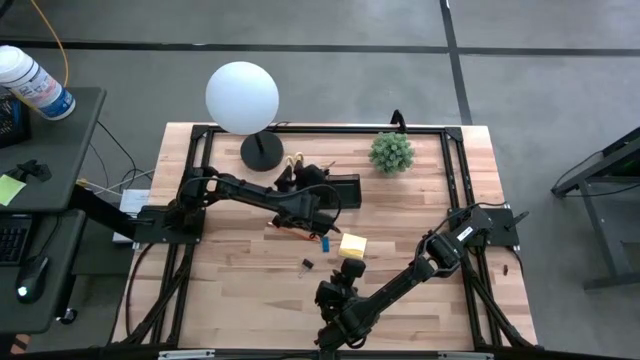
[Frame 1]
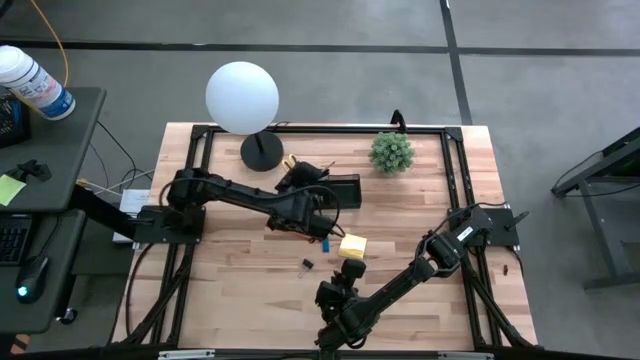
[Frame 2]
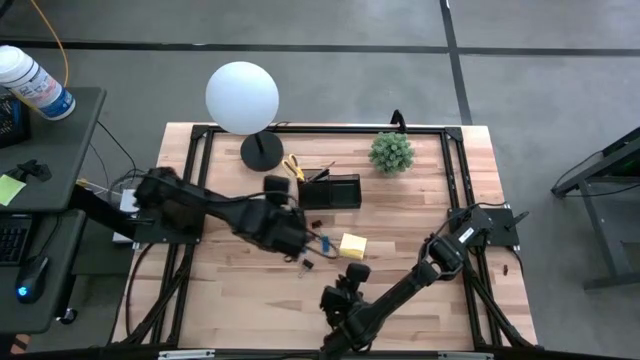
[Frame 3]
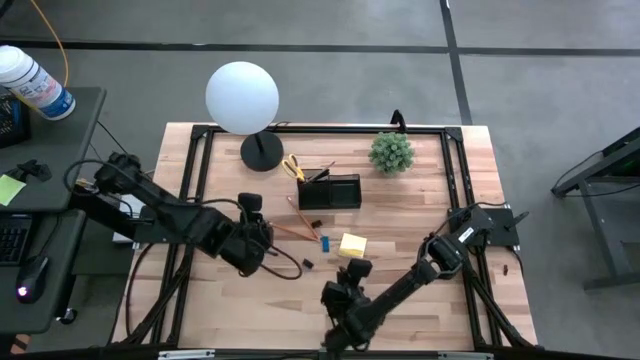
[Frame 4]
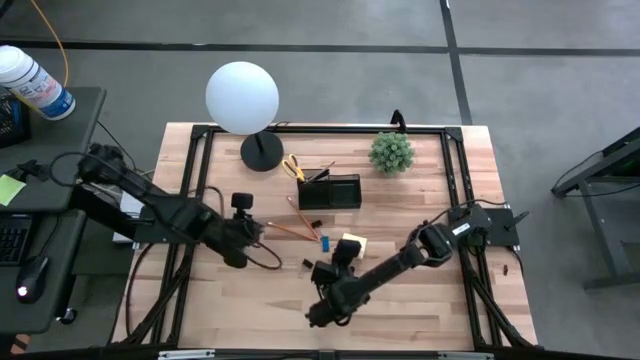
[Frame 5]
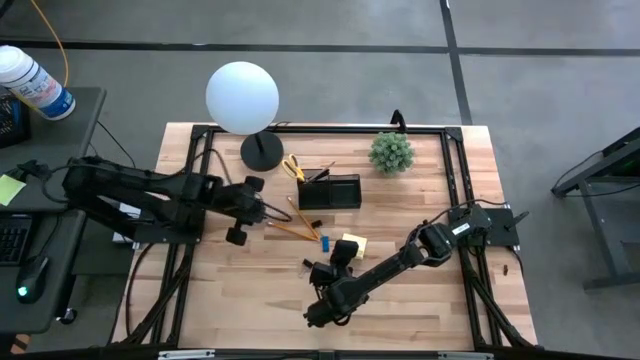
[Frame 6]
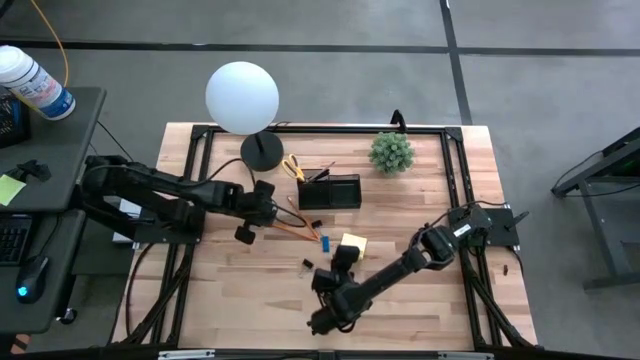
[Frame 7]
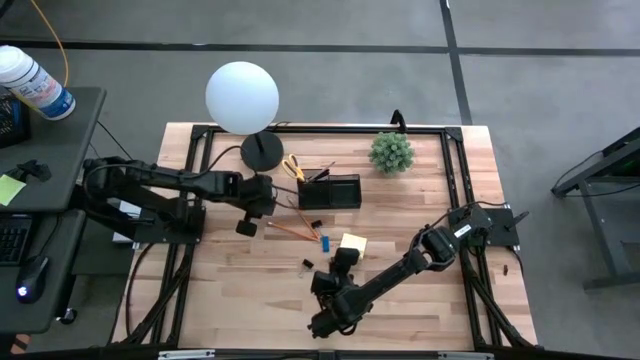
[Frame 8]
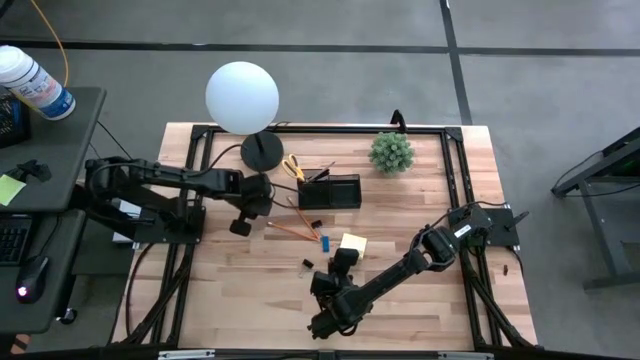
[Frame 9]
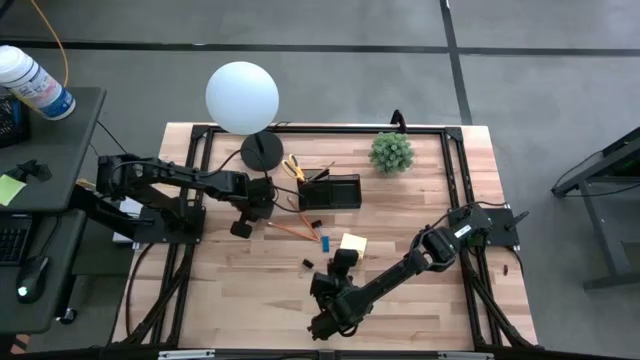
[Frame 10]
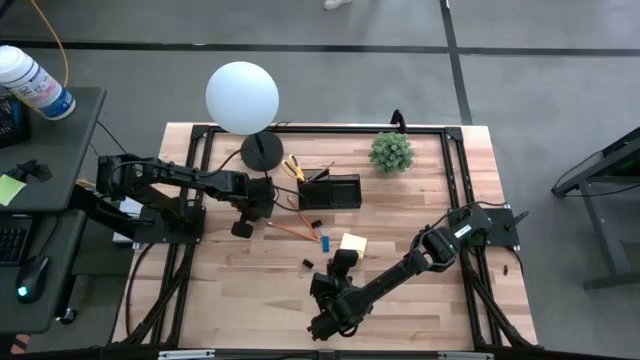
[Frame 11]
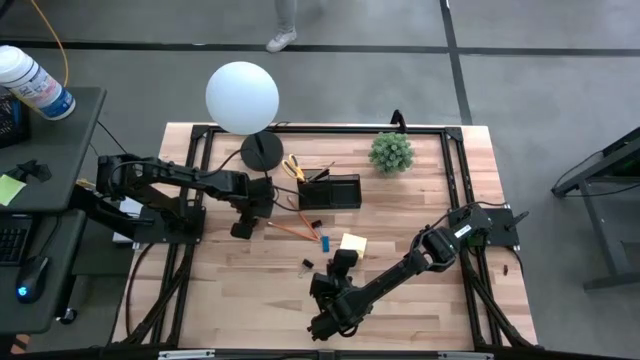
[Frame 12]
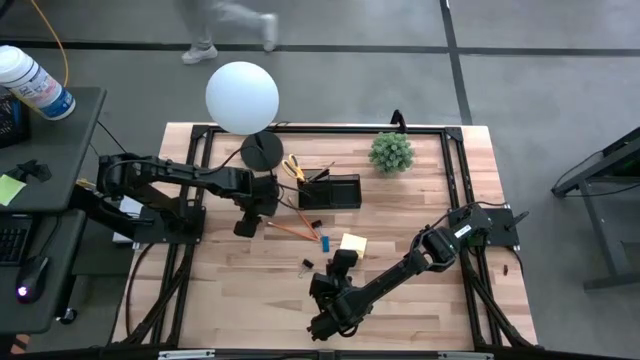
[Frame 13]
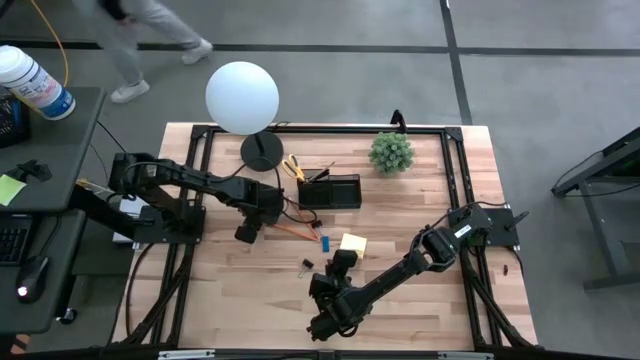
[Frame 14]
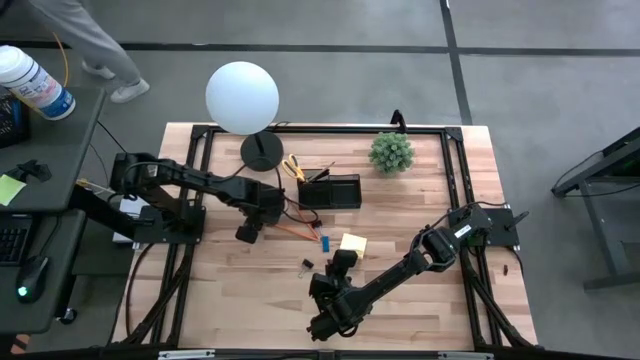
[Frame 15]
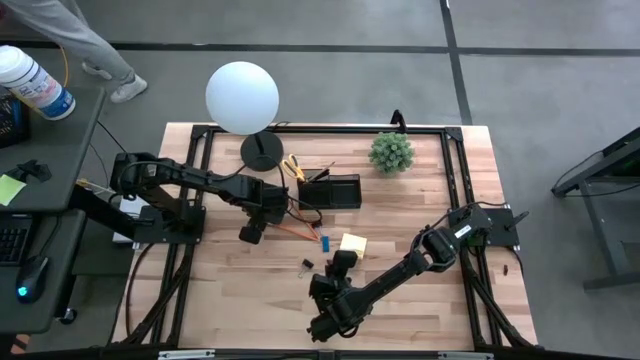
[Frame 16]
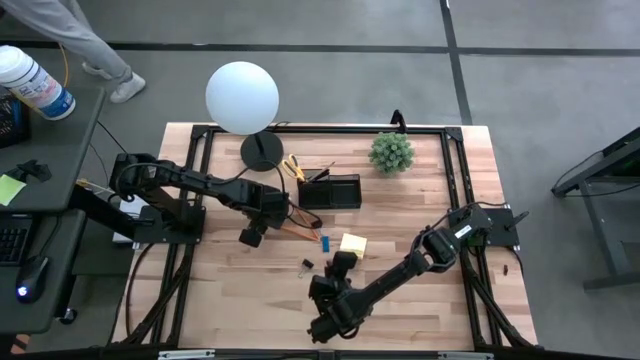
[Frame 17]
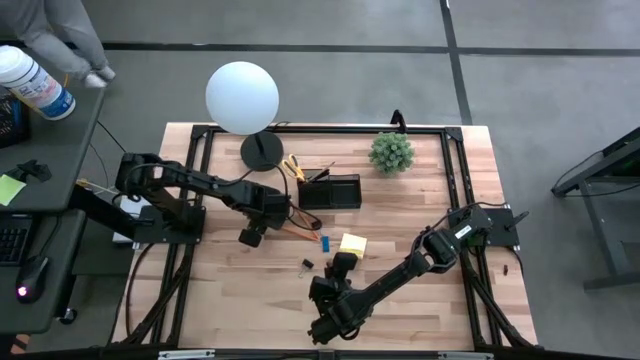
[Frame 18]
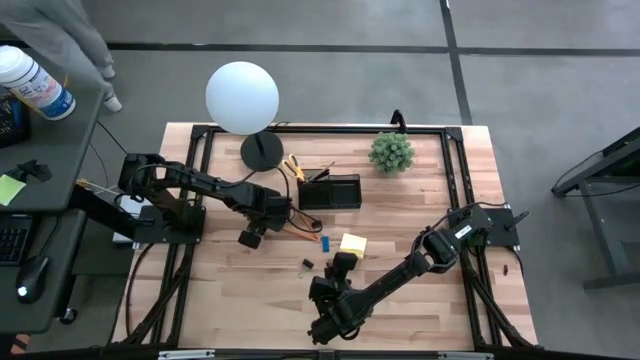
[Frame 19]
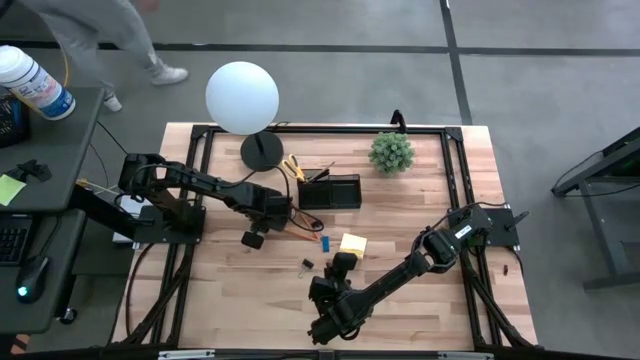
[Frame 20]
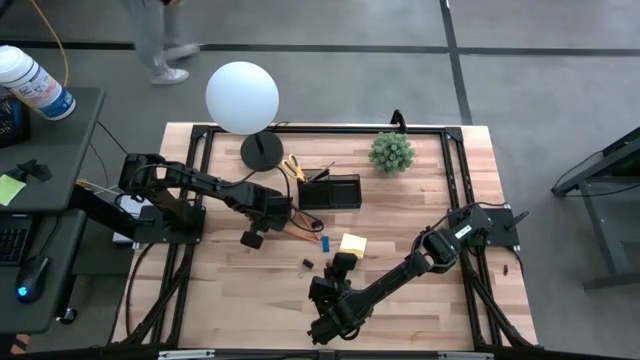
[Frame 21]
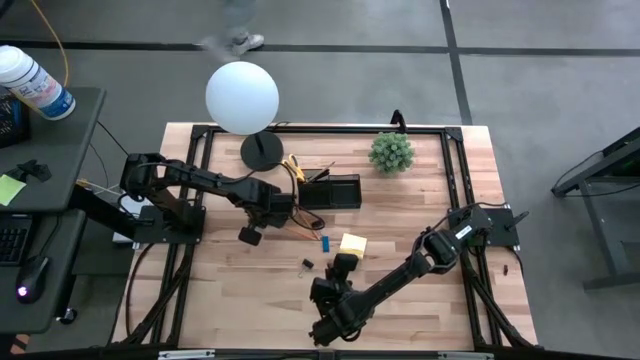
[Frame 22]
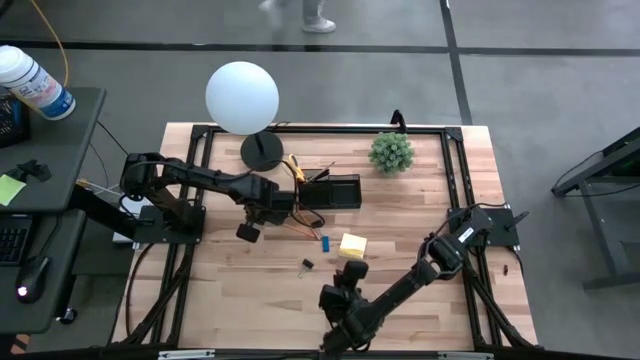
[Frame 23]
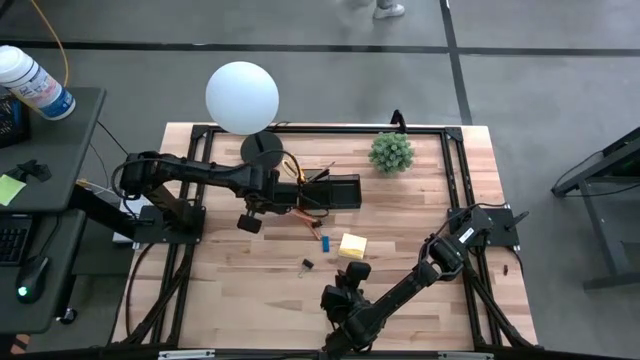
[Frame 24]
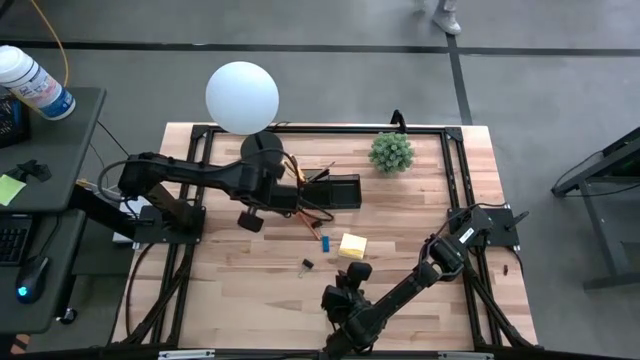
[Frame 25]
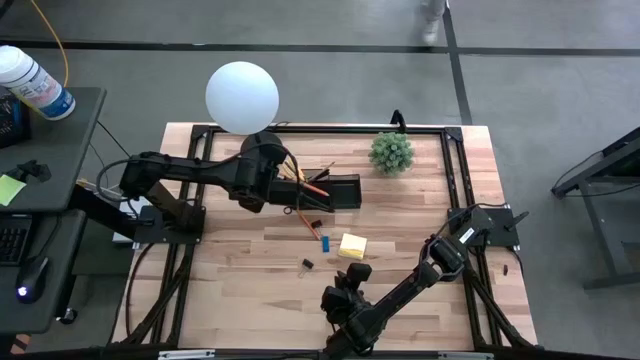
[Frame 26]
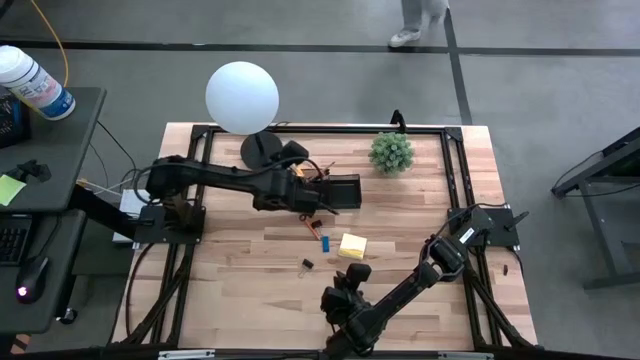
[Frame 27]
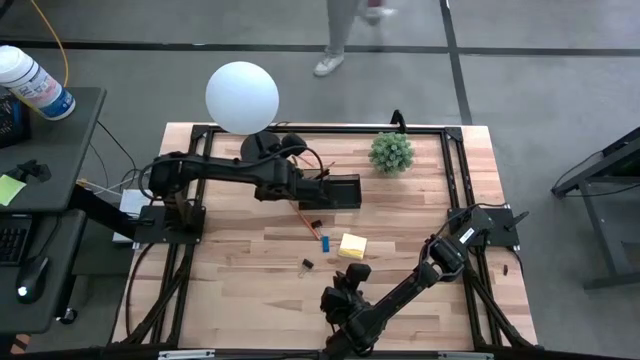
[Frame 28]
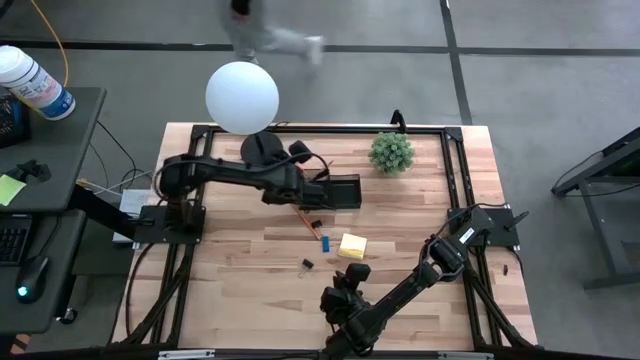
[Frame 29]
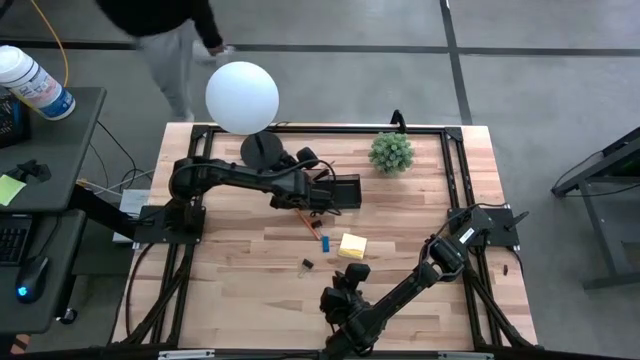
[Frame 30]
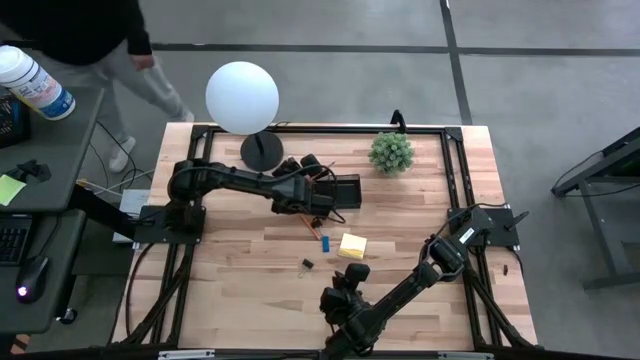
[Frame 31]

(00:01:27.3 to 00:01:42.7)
Task: Pick and place office supplies into organizer
Put the bottom yellow pencil into the black organizer

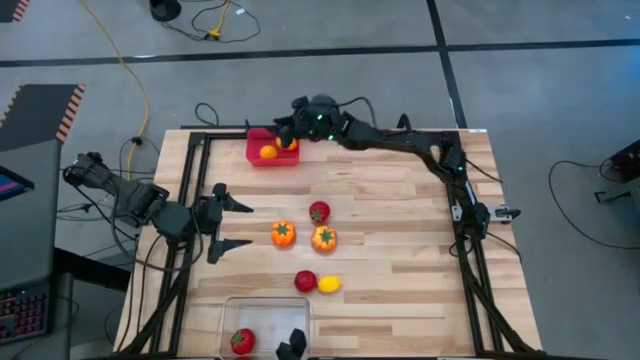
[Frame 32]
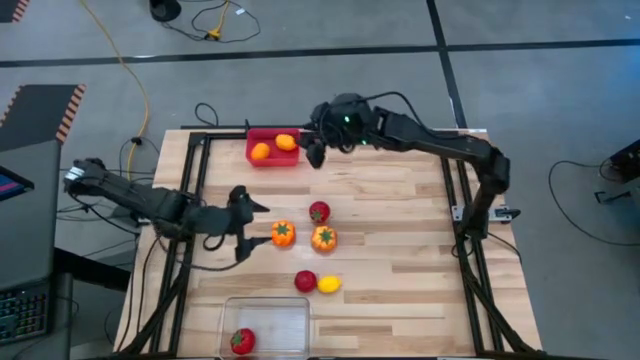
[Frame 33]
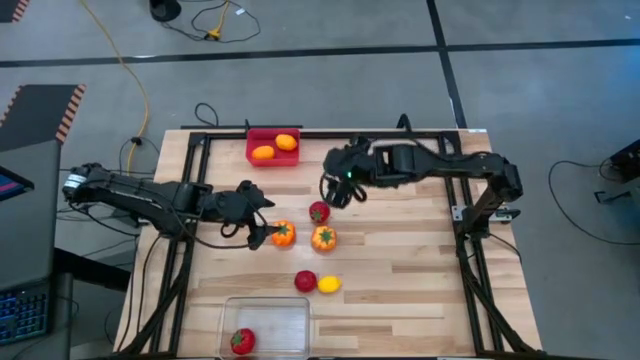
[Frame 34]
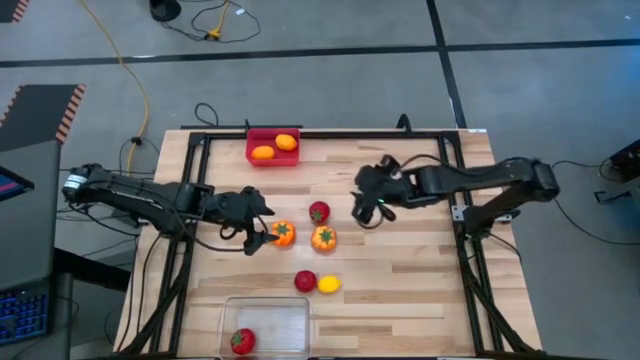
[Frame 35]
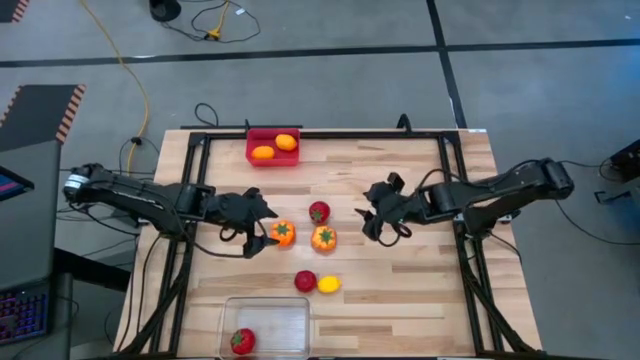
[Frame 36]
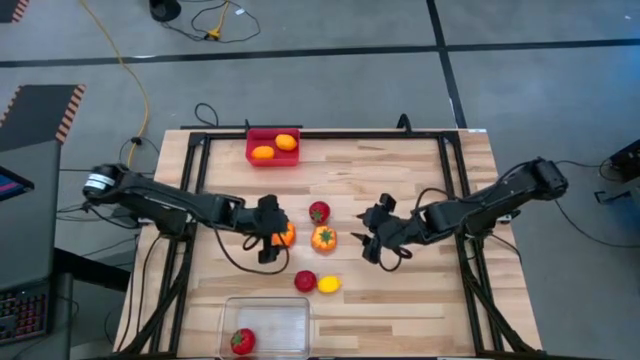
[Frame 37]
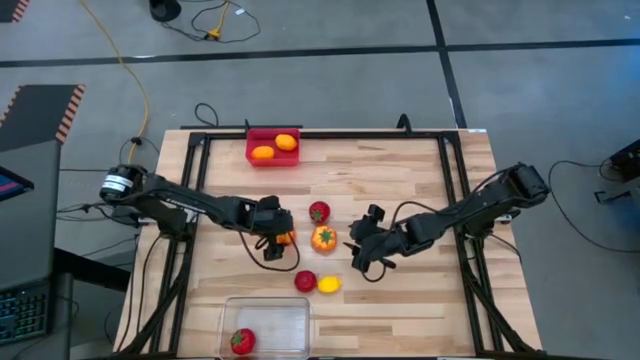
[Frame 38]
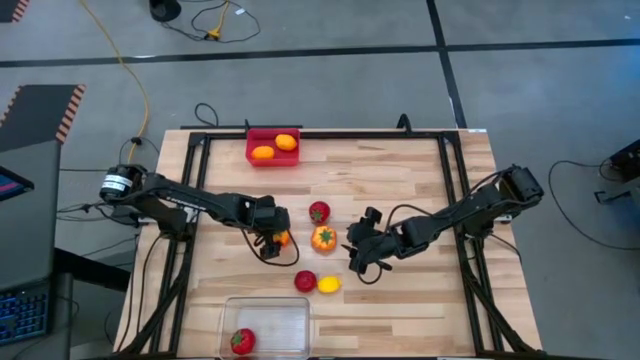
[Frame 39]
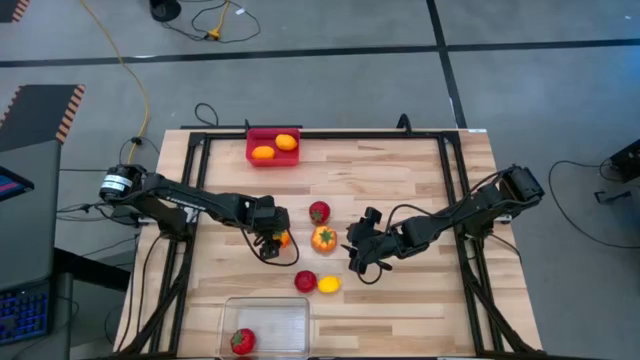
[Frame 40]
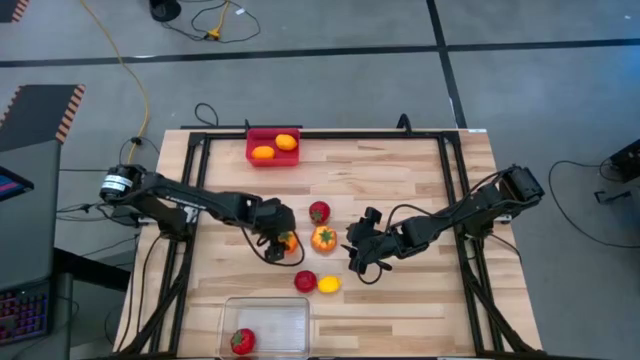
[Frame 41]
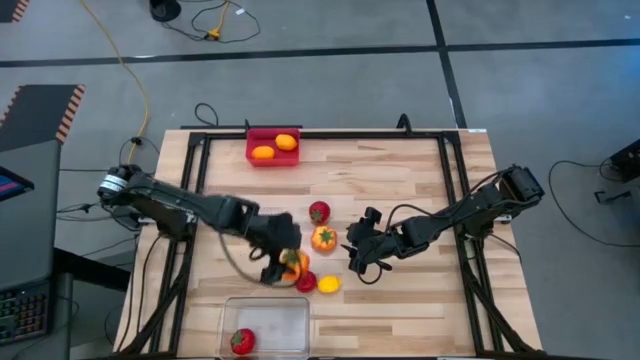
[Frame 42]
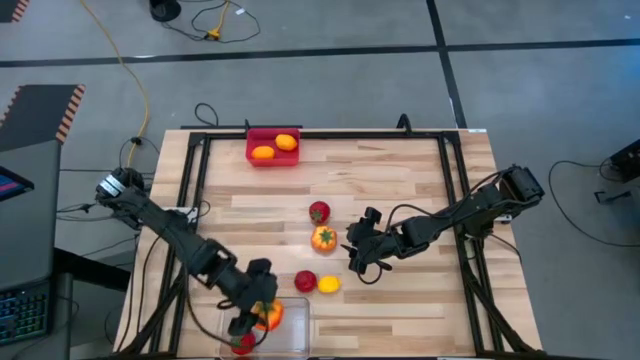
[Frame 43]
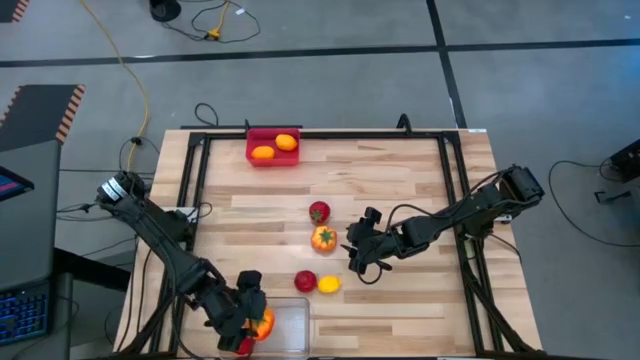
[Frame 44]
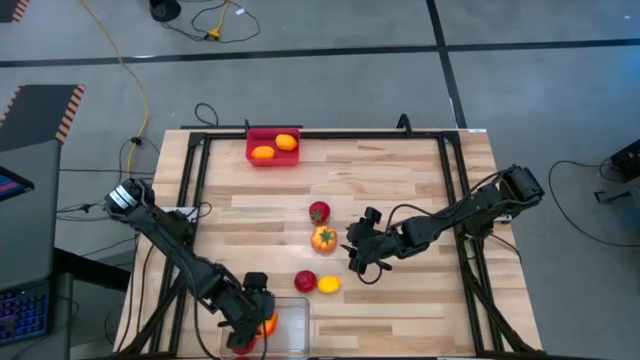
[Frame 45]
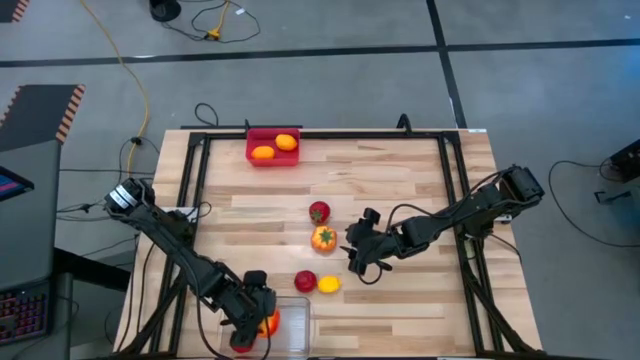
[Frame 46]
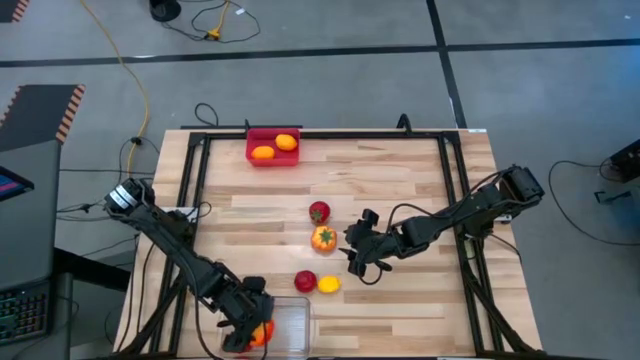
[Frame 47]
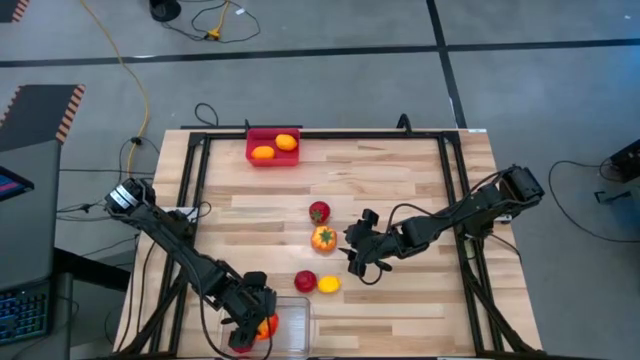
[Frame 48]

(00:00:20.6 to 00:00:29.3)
Task: Sort produce into baskets
Put the left orange tomato into the transparent bin
